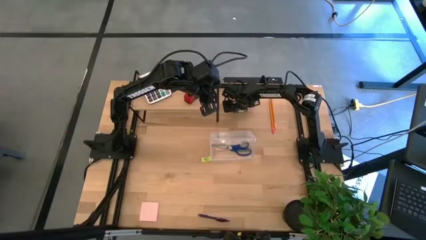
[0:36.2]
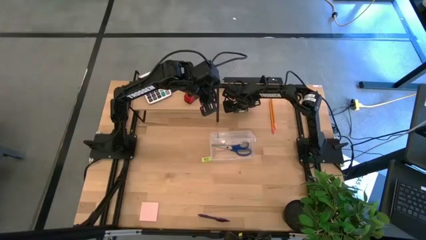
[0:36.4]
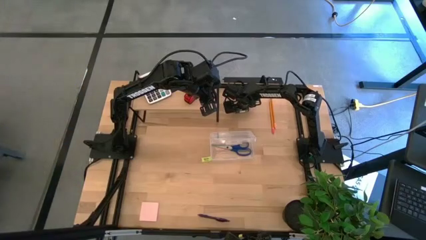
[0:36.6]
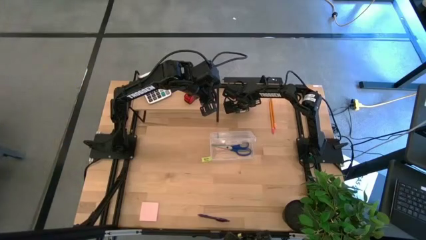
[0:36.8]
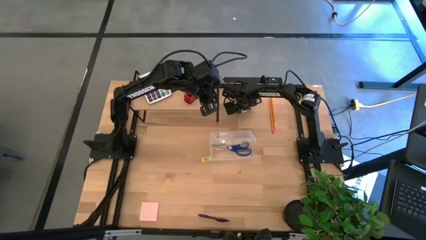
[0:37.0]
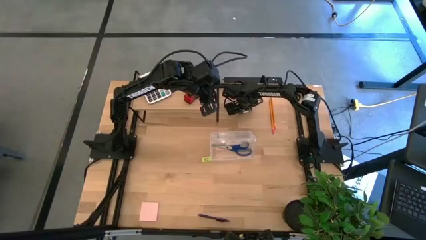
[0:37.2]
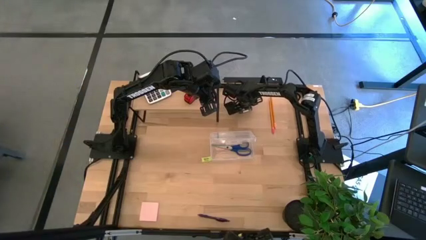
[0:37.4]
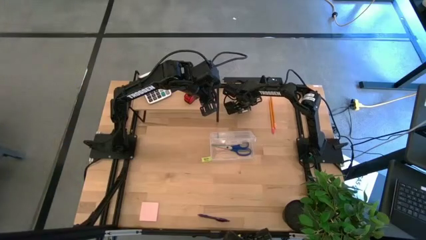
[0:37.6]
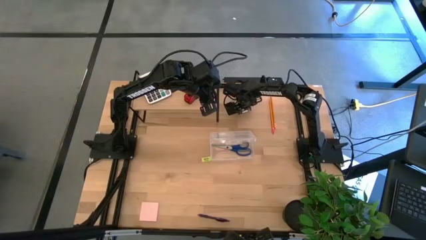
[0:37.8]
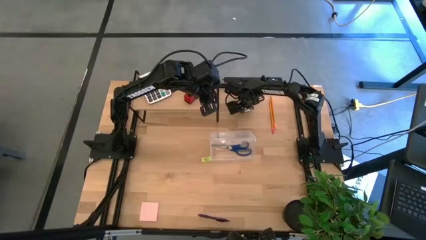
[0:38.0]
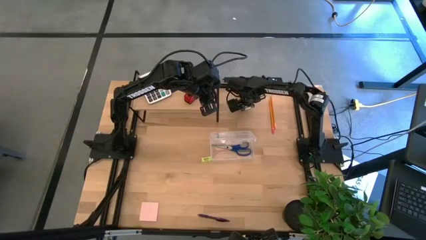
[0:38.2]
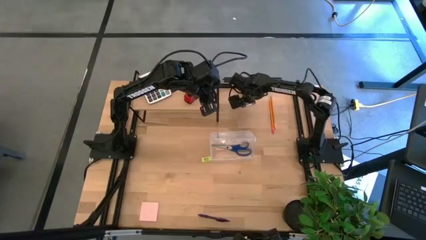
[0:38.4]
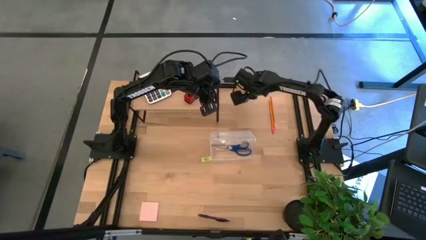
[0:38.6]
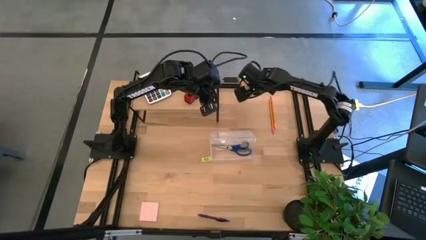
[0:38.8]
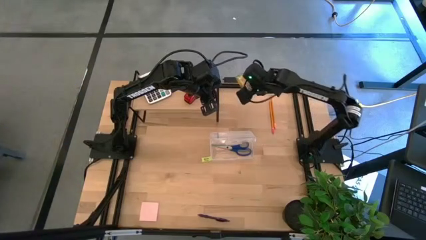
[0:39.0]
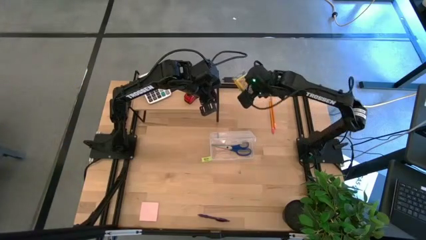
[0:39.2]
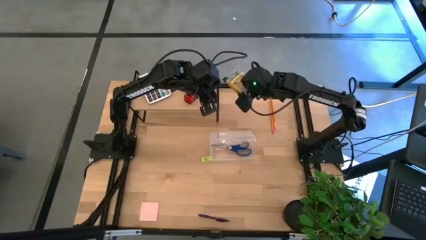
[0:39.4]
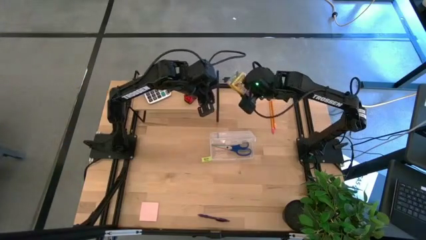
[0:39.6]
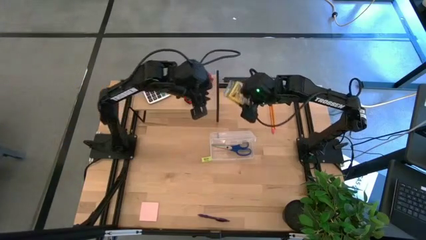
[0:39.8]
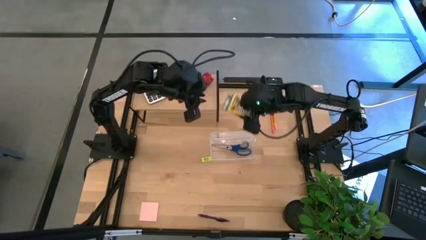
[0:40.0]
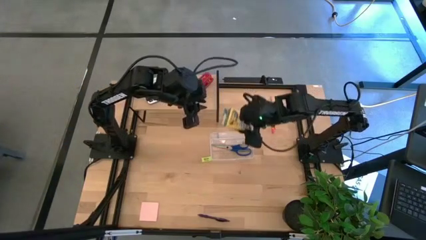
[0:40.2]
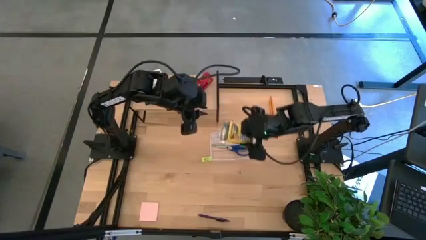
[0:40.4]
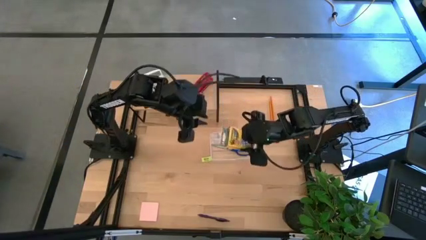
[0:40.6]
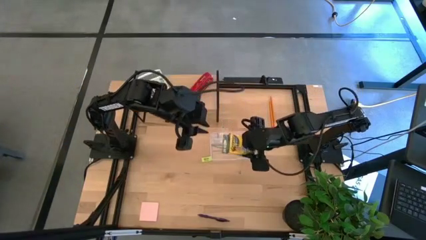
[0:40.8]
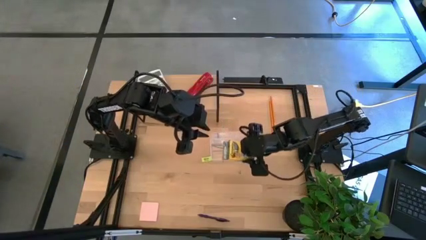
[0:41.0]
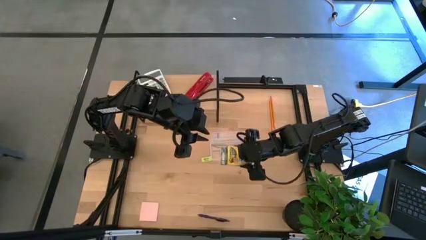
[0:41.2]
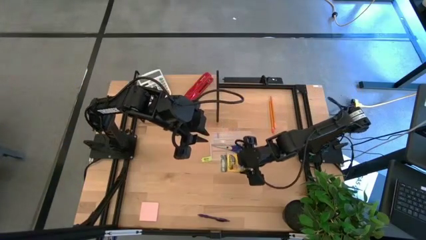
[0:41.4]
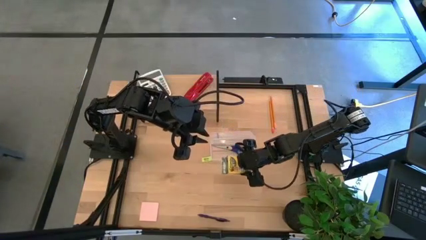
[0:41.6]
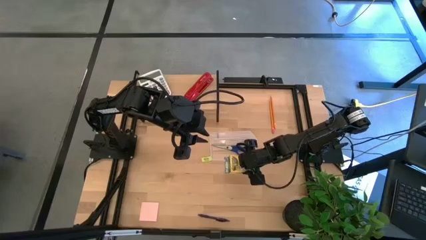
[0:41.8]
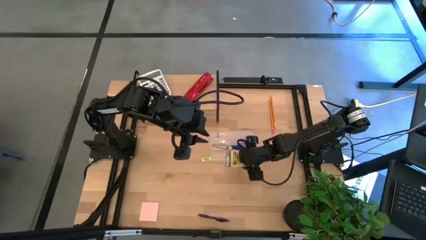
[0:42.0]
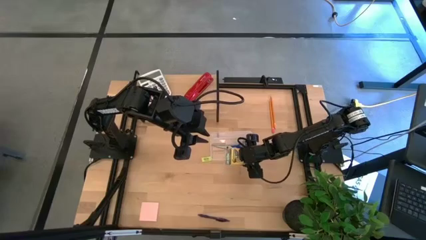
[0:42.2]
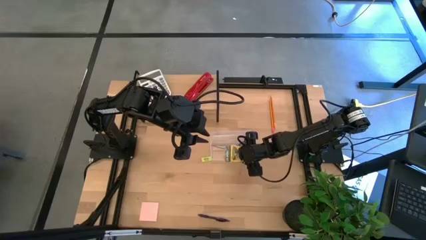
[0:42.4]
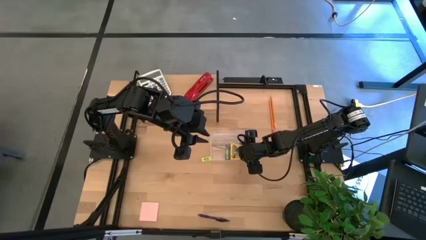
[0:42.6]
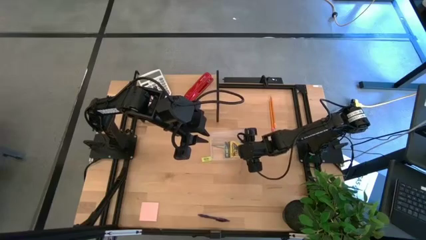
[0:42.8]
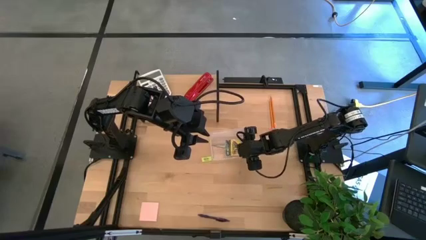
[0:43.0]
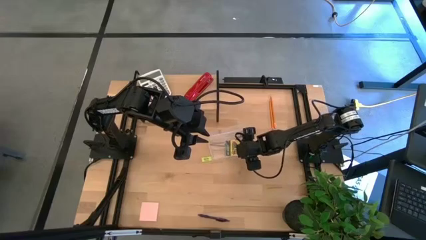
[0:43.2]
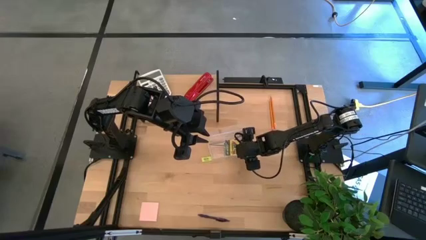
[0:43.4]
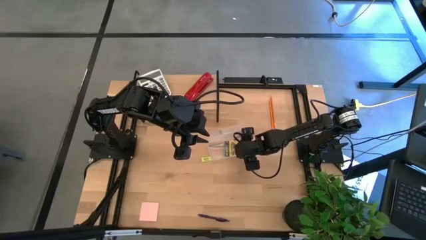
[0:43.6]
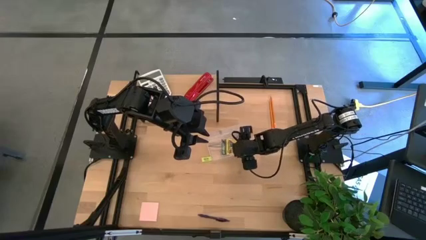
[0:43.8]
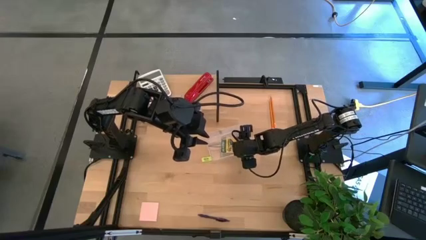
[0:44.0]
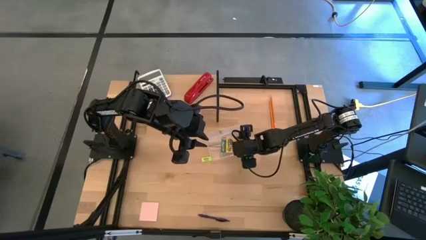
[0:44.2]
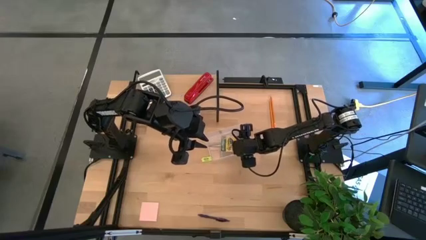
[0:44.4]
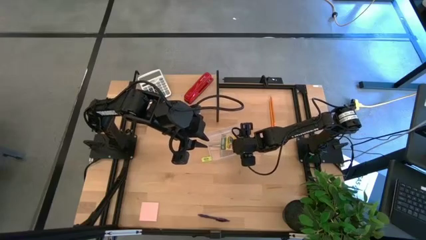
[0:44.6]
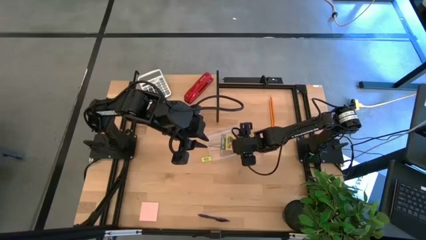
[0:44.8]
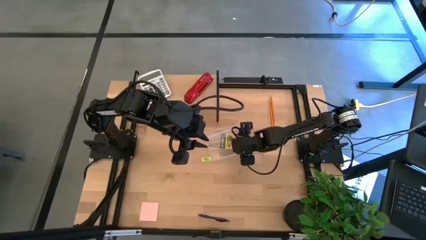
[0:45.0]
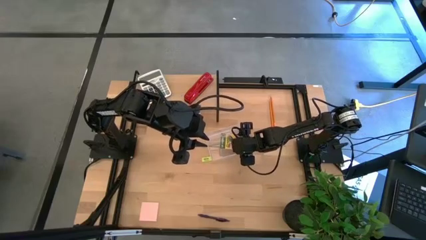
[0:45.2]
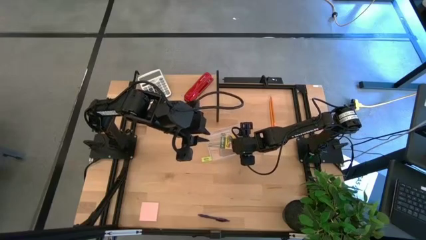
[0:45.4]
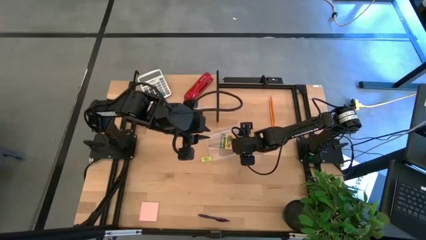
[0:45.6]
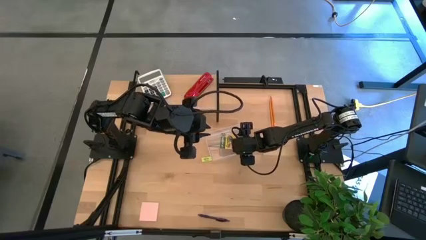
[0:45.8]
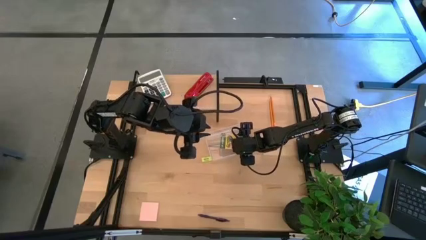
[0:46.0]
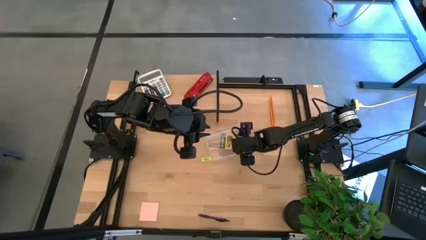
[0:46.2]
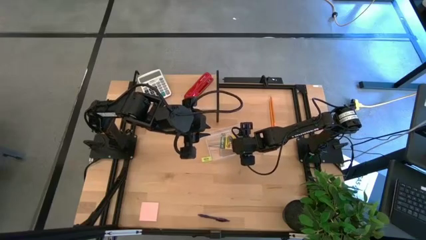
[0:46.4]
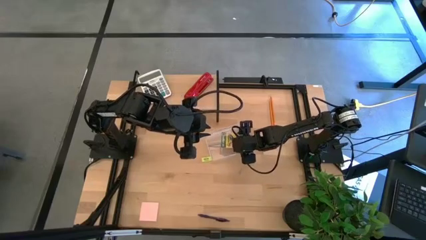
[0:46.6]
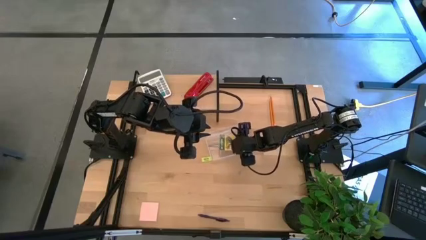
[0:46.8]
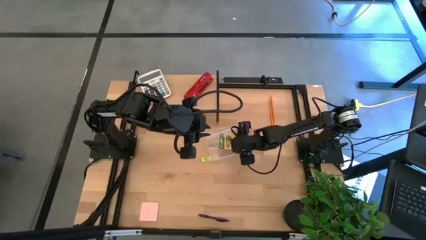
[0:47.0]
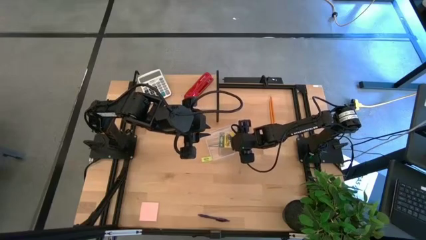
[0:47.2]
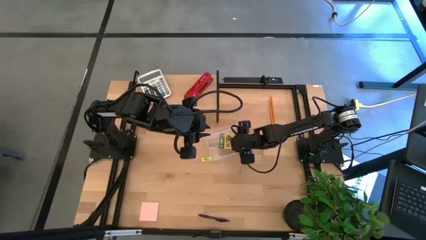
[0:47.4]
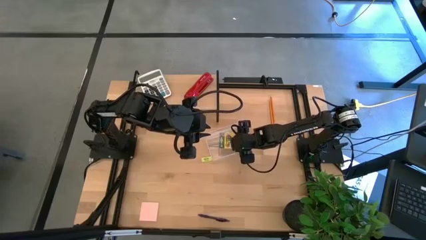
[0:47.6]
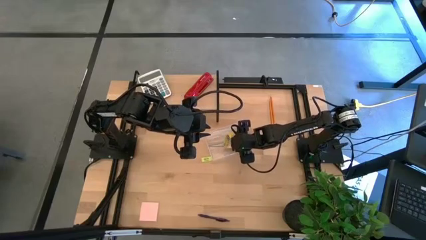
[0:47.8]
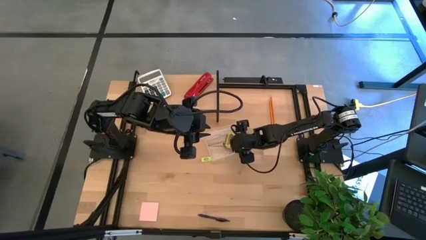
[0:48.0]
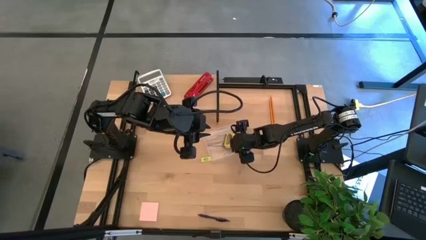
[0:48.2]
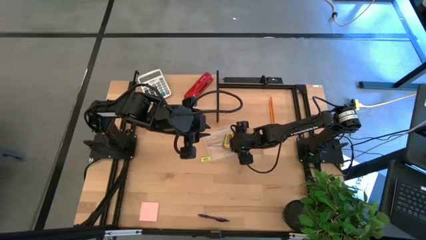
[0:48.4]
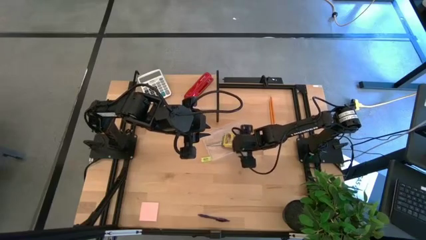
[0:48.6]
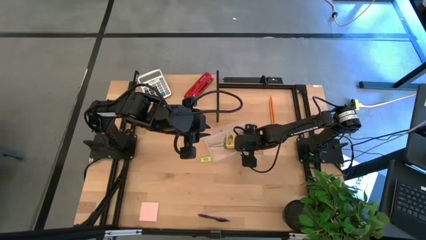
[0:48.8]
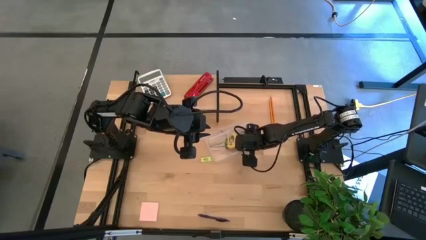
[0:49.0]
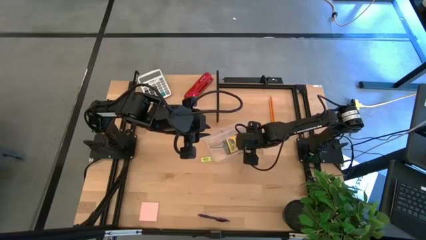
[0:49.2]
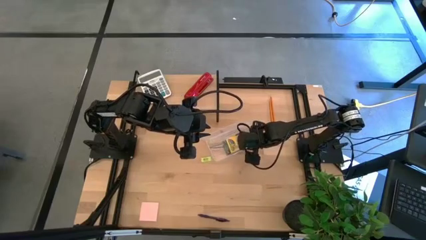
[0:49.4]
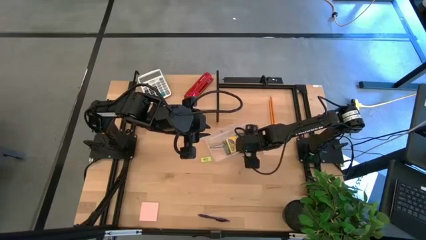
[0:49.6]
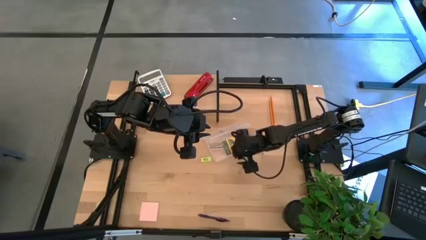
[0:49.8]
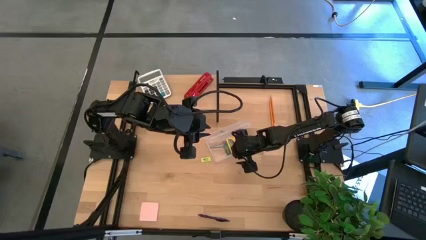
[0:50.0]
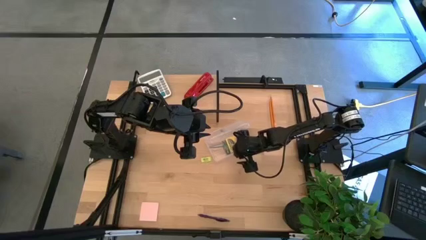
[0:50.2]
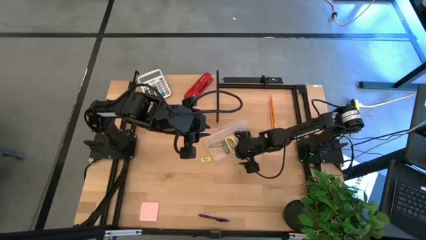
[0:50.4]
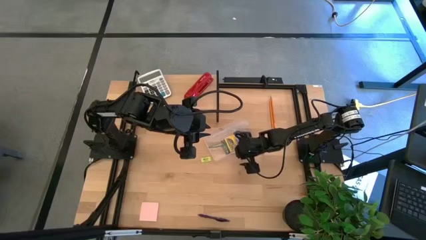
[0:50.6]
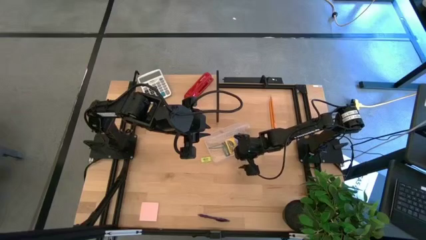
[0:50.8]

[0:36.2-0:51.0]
Task: Pack school essentials
Put the yellow crayon box into the supply box
